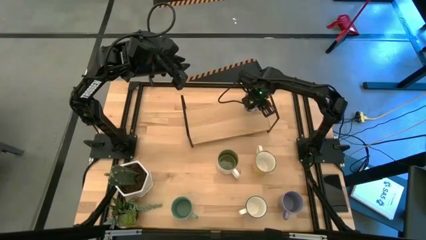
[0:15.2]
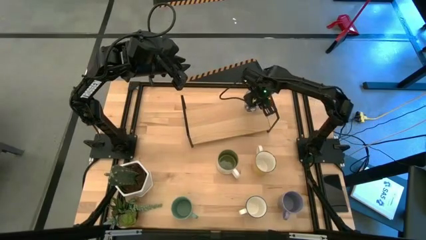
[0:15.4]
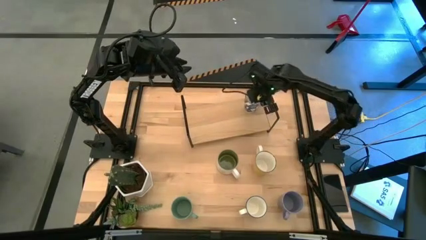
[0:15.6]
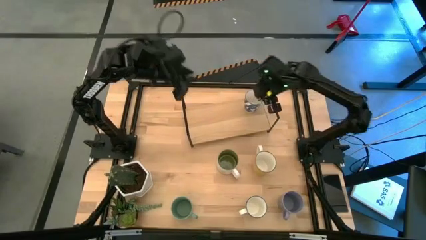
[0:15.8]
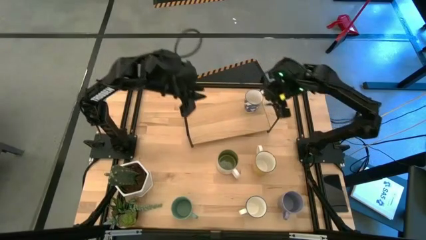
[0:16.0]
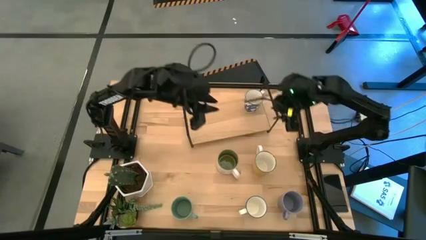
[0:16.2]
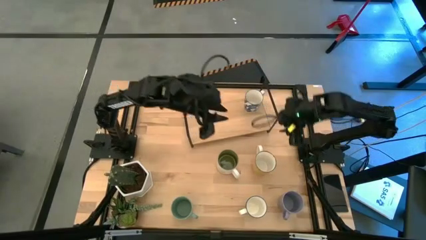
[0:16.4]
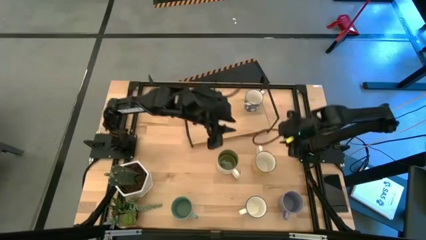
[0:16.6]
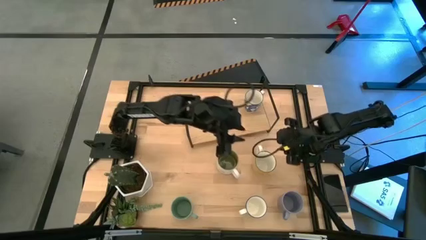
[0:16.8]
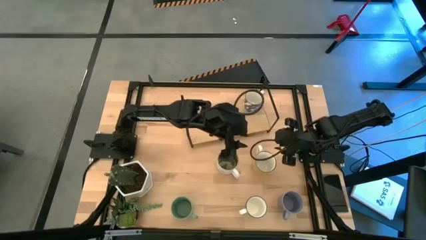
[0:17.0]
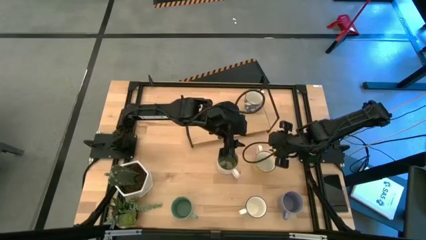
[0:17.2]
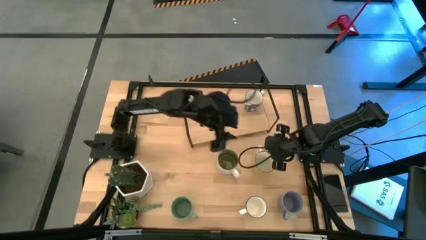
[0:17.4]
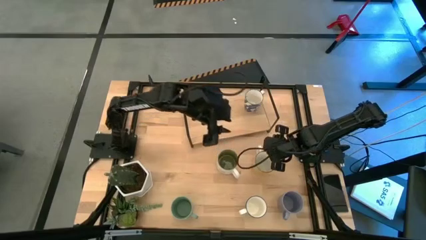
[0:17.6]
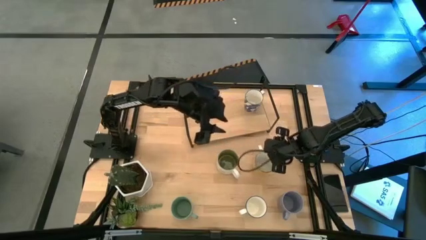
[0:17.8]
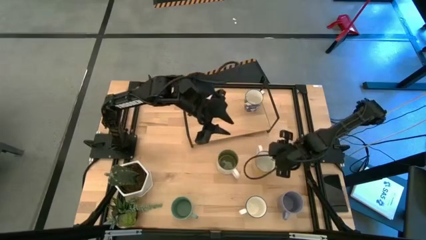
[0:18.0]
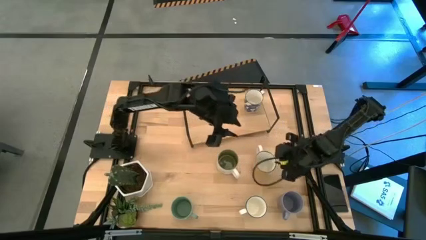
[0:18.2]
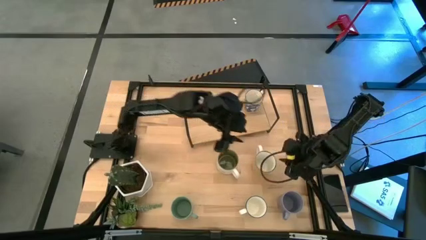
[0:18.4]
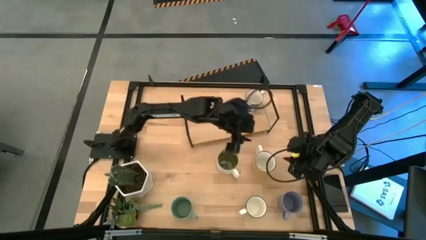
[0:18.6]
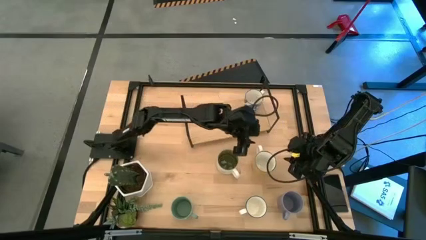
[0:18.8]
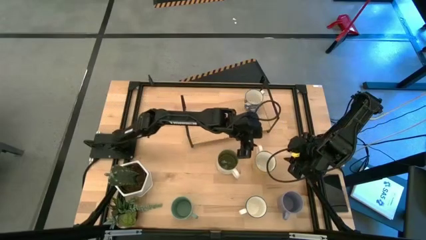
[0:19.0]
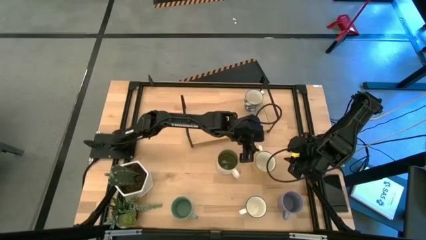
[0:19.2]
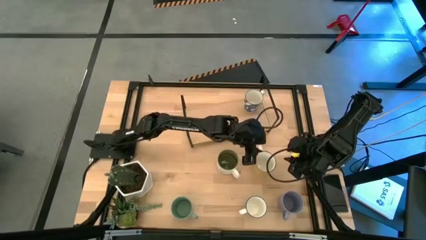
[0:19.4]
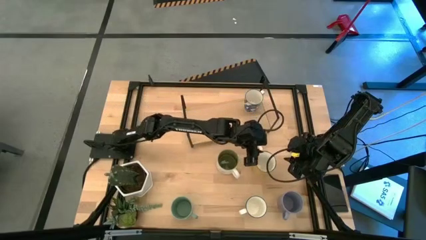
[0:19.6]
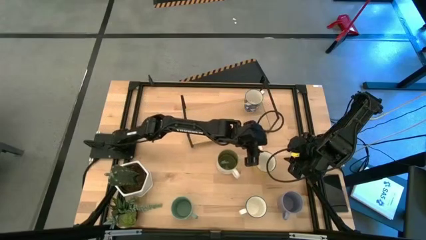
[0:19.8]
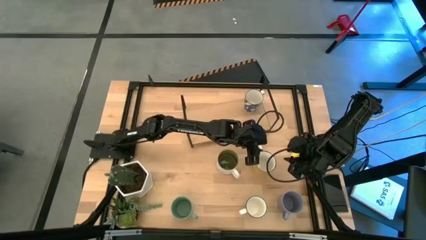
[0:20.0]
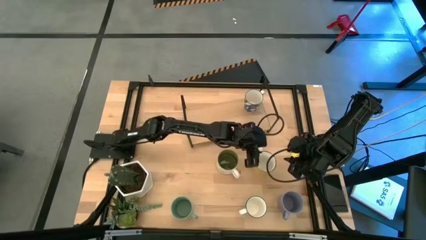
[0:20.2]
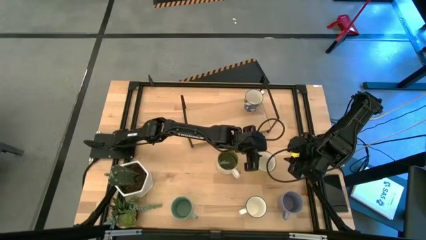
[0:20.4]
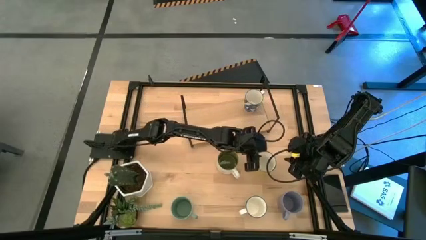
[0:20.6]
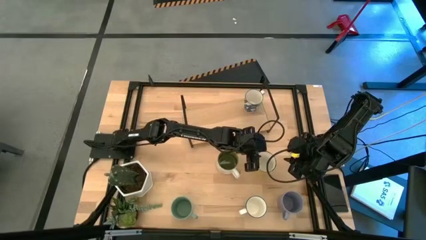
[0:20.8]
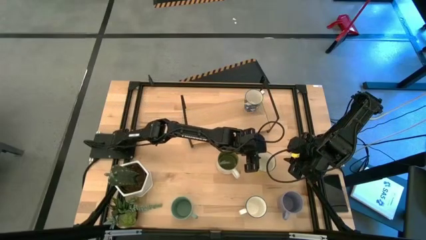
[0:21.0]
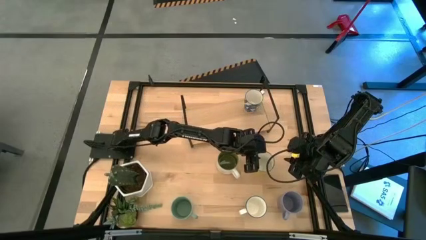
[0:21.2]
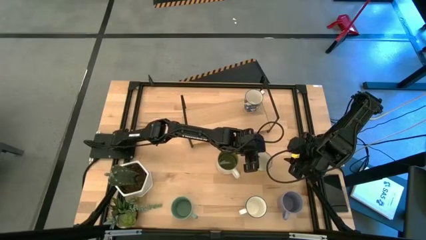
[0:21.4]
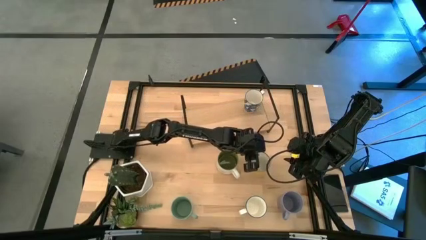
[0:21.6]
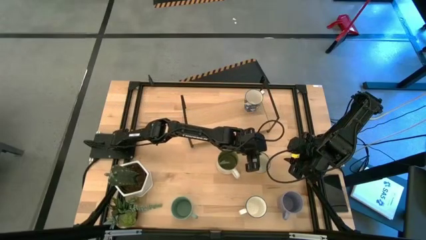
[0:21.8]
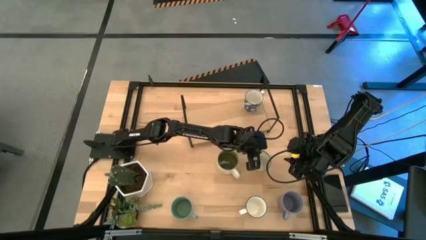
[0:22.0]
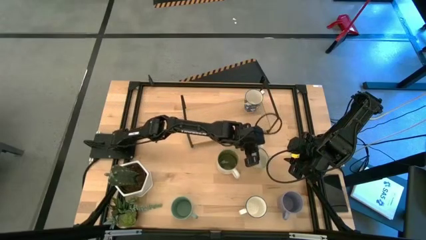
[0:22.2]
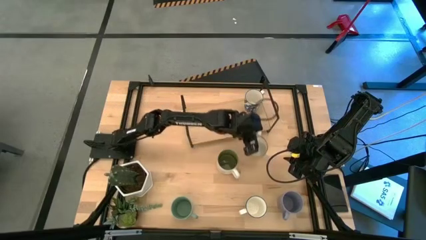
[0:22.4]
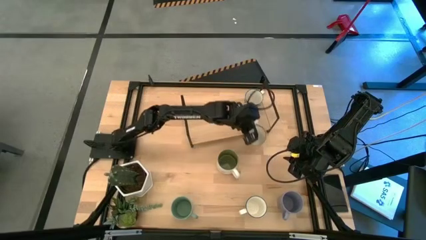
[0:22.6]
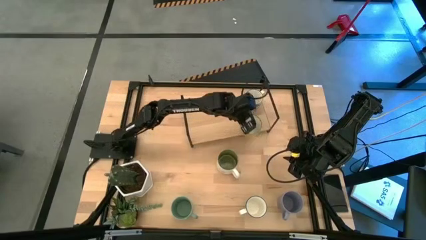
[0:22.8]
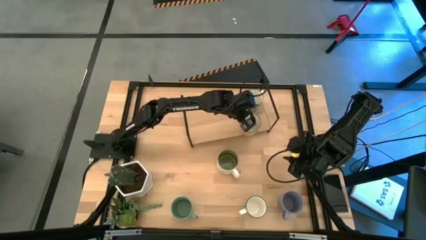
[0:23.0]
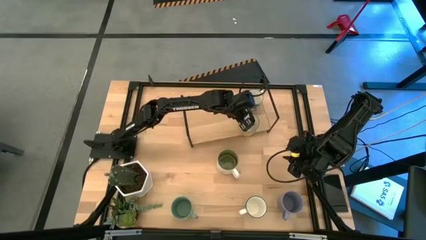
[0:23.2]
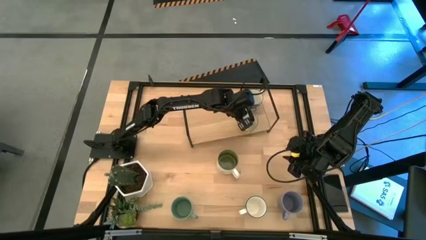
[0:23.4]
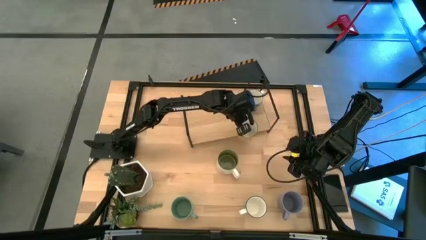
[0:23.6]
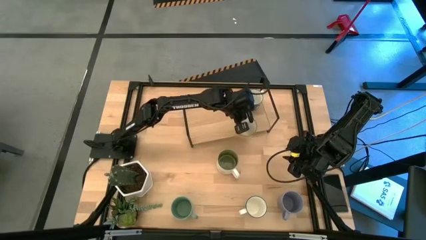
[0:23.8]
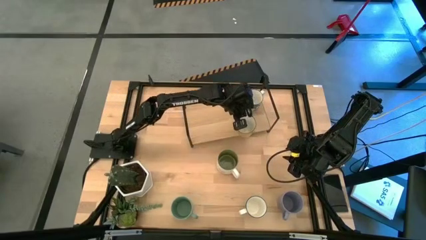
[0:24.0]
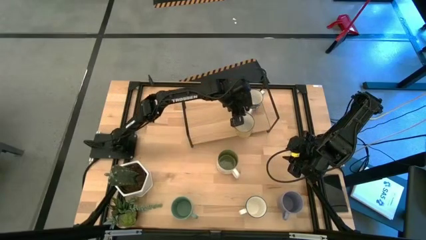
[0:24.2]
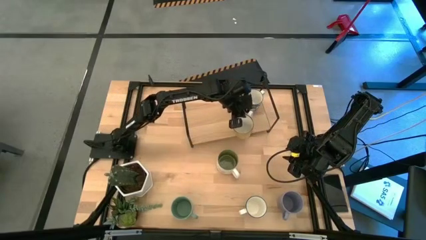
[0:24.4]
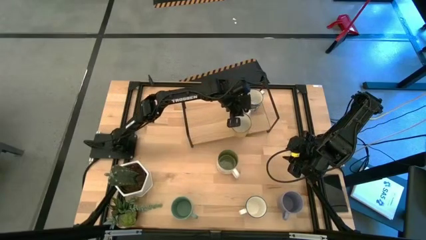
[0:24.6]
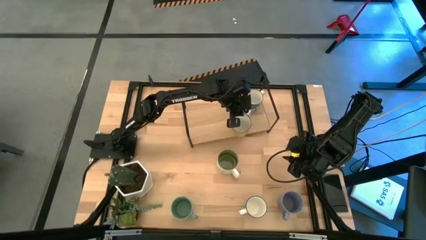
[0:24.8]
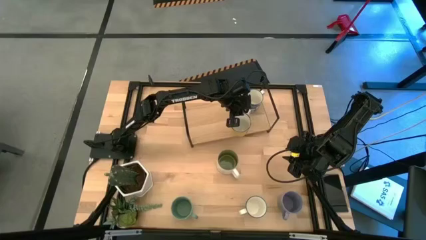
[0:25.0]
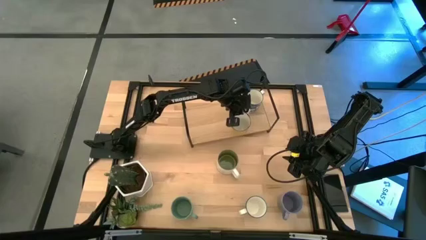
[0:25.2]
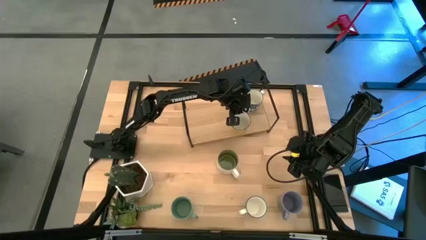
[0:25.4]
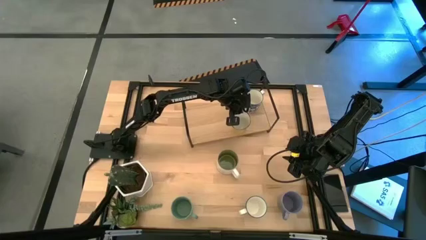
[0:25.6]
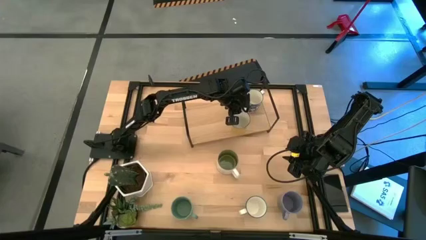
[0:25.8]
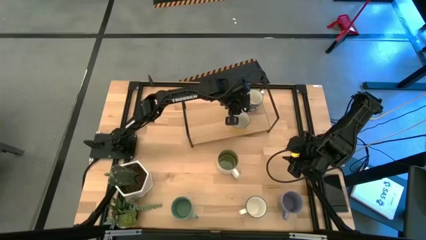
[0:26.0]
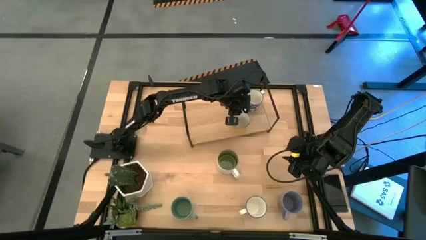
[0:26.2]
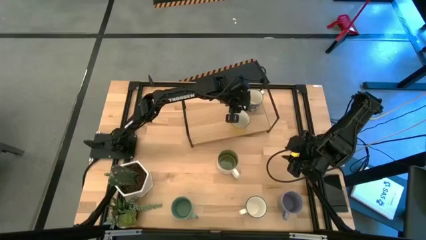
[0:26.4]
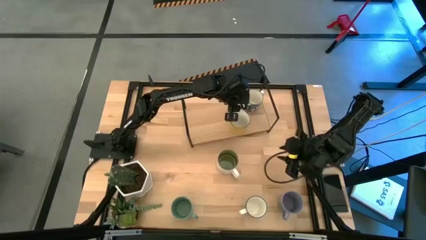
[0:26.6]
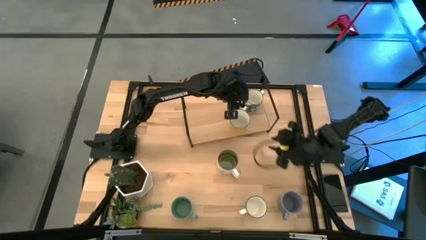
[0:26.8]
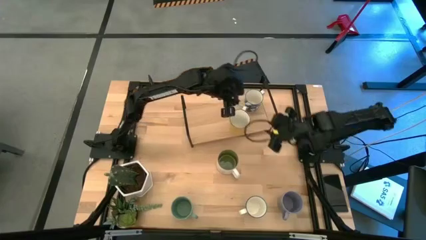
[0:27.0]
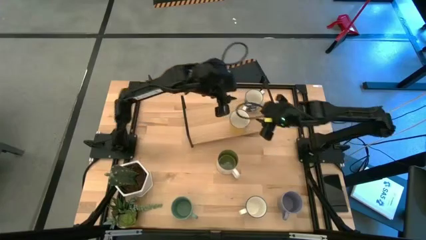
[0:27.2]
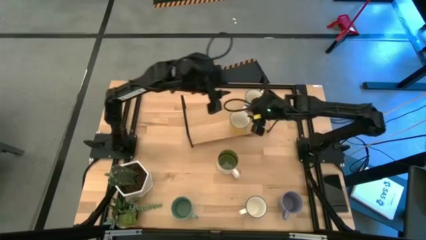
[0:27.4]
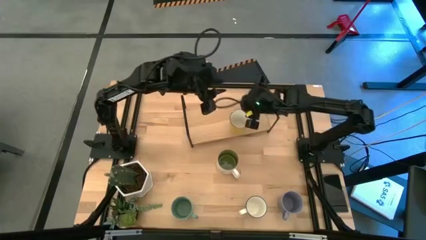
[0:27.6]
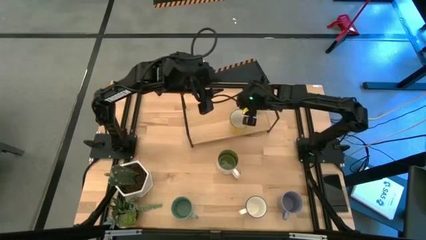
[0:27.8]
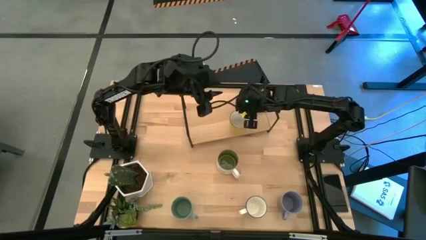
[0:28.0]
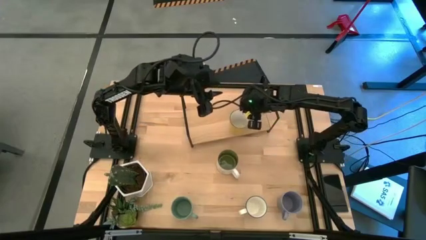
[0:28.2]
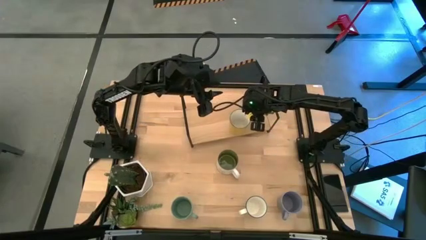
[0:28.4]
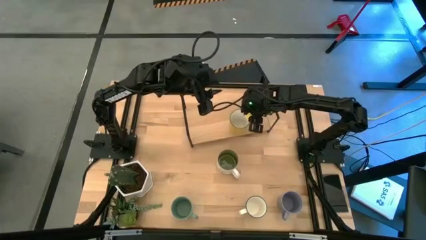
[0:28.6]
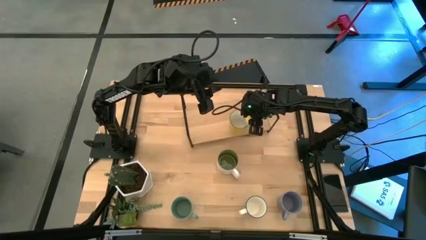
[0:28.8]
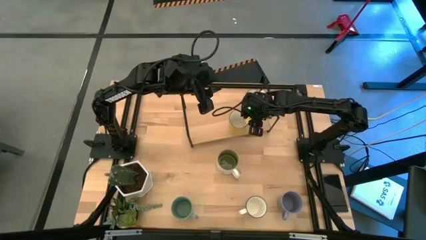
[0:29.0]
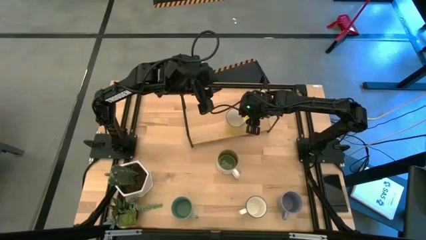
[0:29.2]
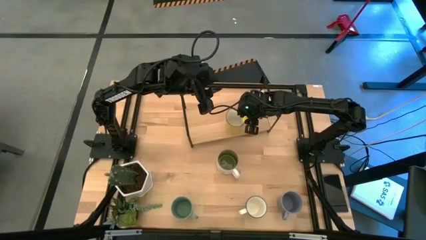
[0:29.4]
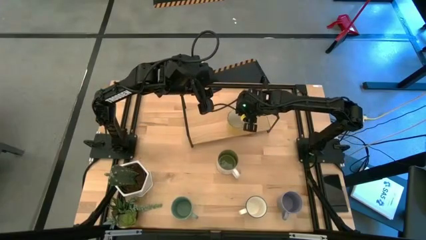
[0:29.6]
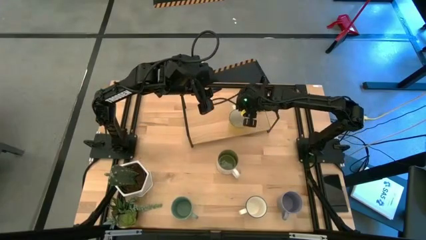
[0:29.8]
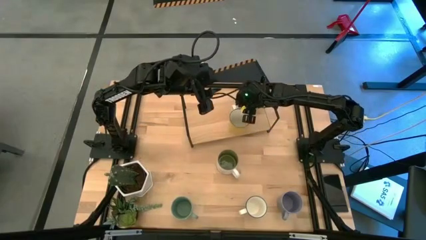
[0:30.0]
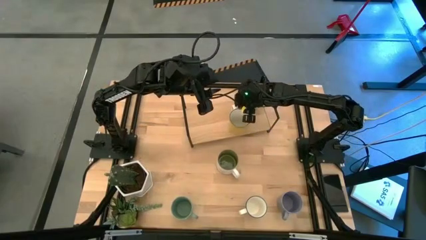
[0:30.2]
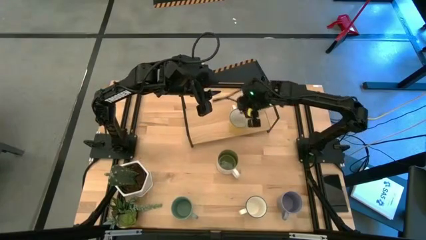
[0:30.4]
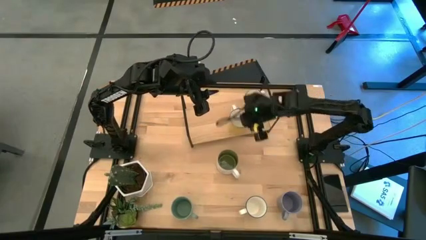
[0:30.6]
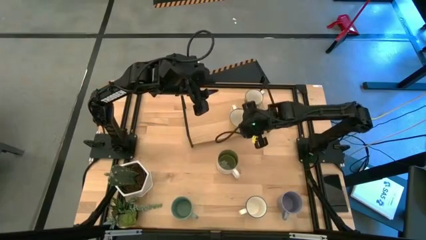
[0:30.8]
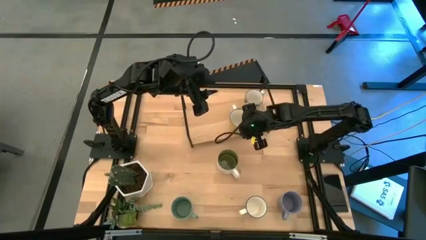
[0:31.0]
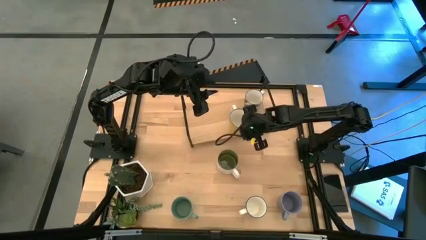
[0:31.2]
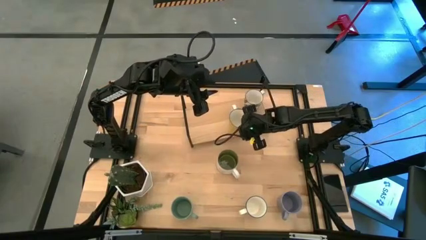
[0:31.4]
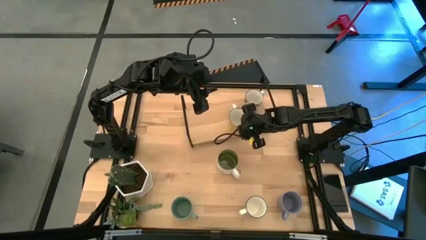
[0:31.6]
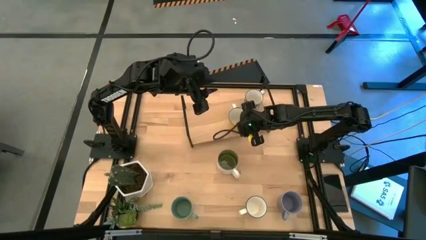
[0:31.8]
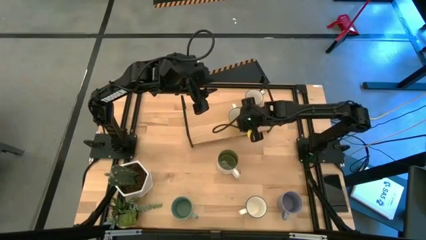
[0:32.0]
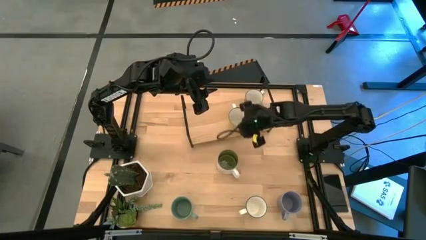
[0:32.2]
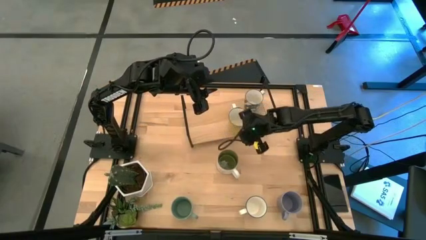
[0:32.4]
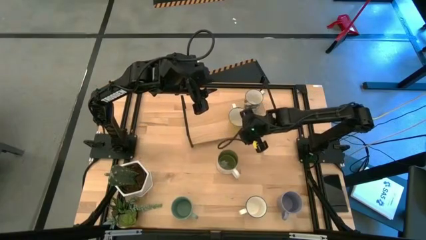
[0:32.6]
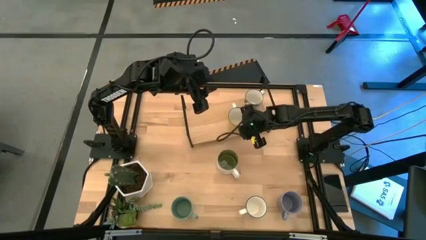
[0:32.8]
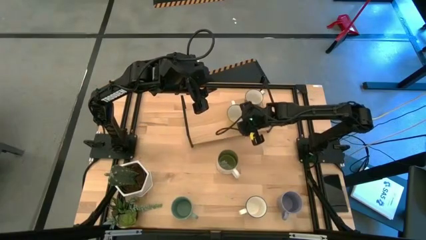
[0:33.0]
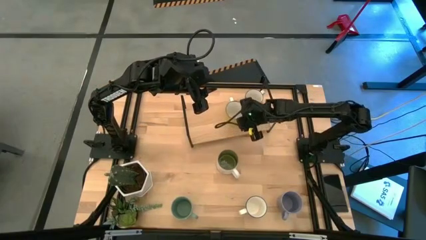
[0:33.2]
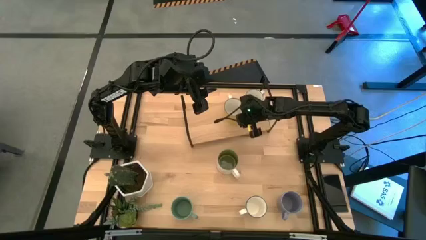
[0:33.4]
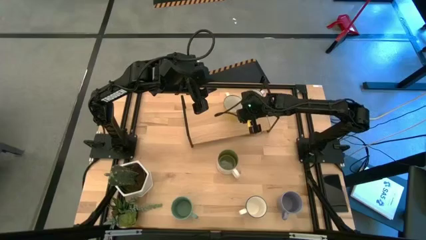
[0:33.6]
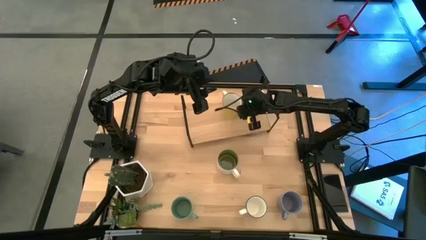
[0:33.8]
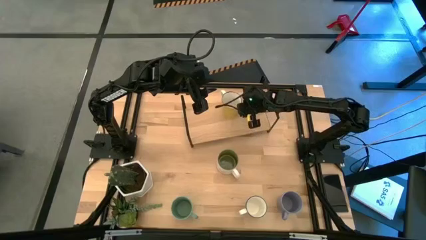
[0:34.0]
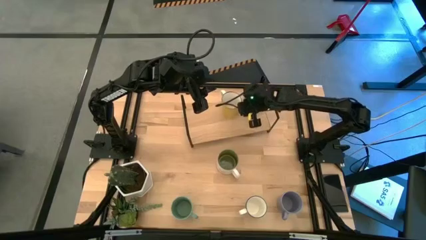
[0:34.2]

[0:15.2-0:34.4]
Task: Place coffee mugs
Put the yellow mug on the shelf
